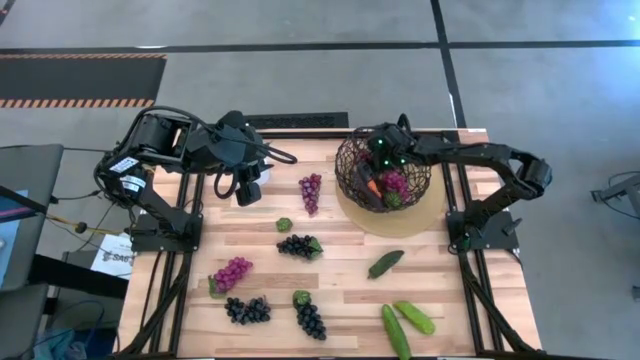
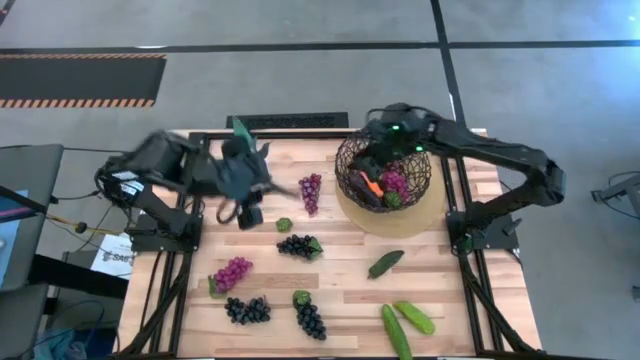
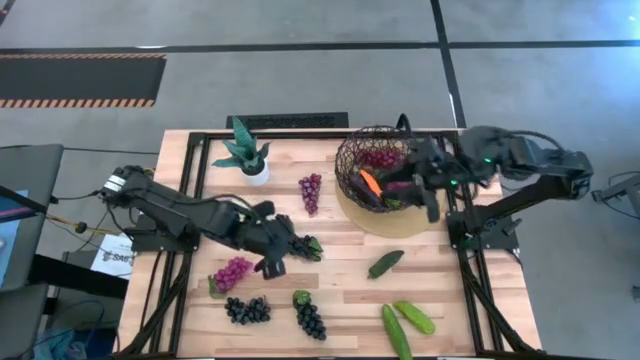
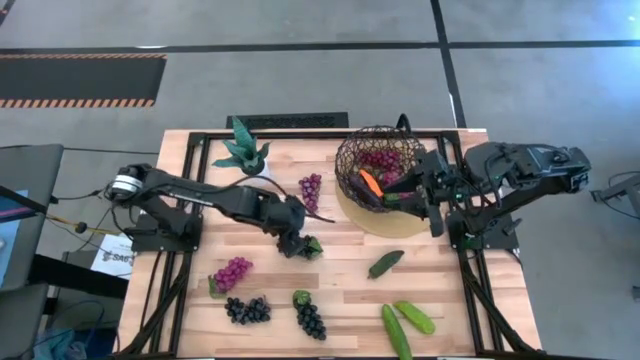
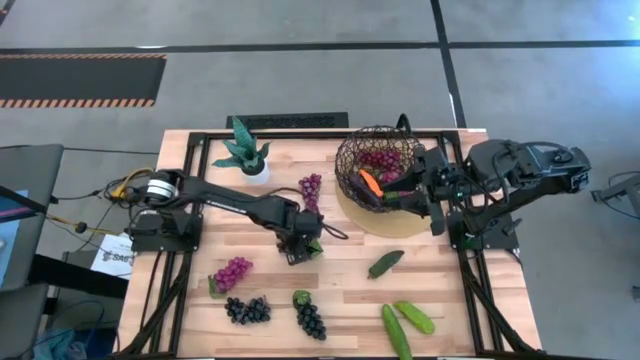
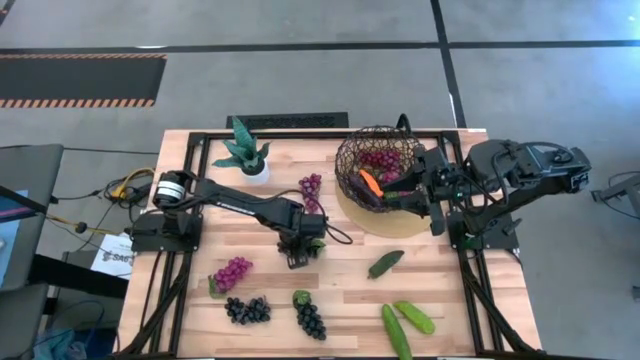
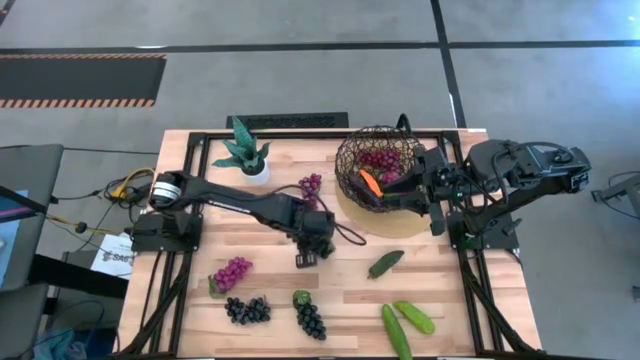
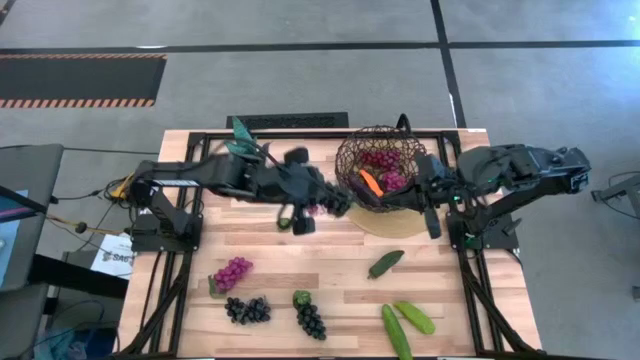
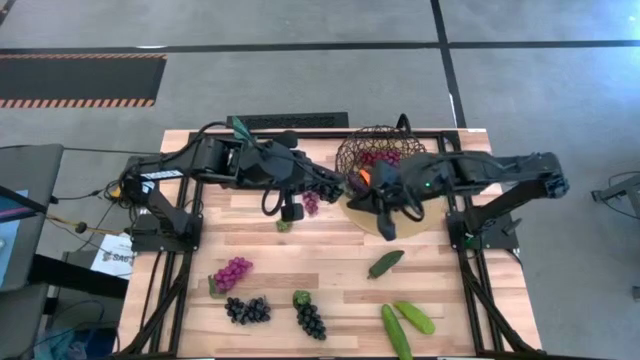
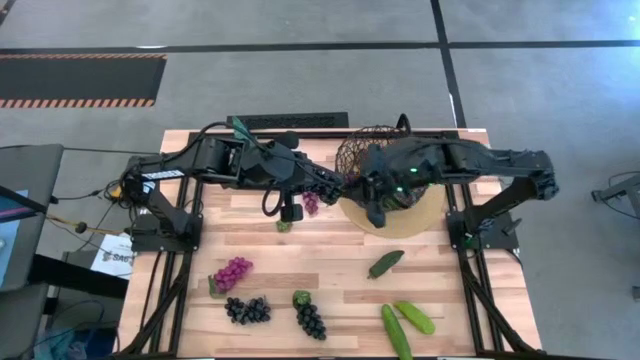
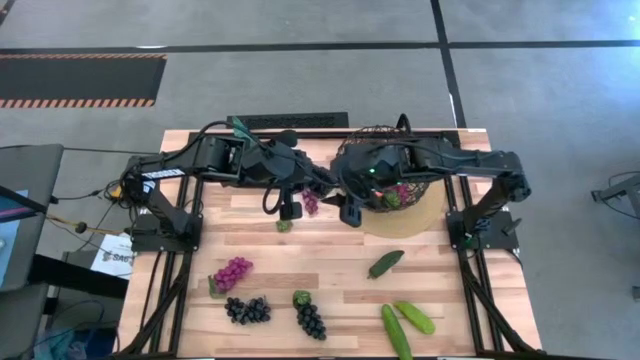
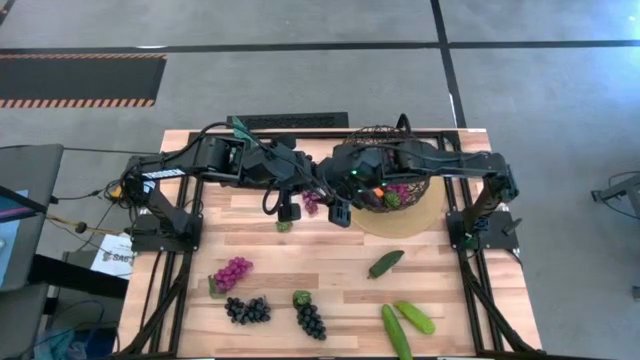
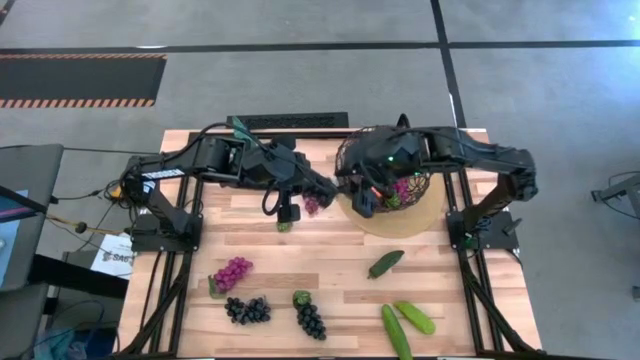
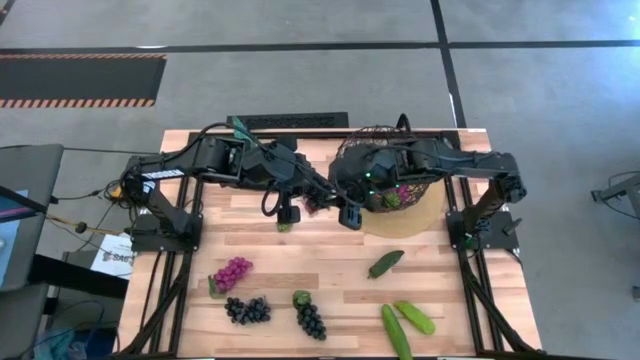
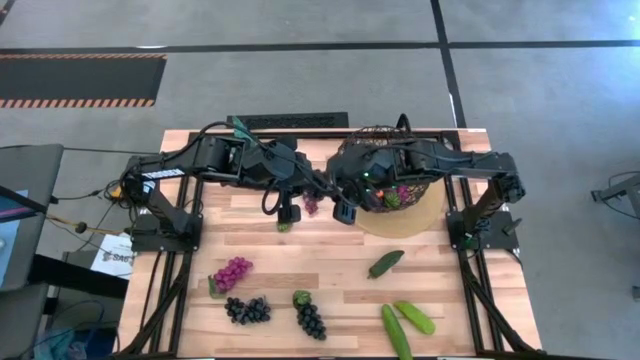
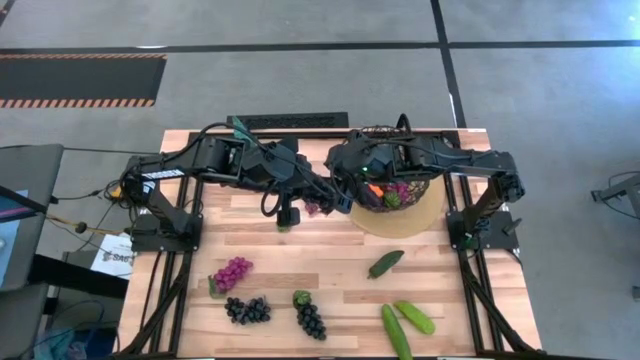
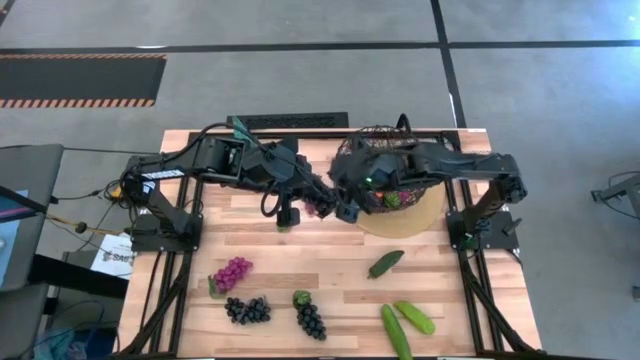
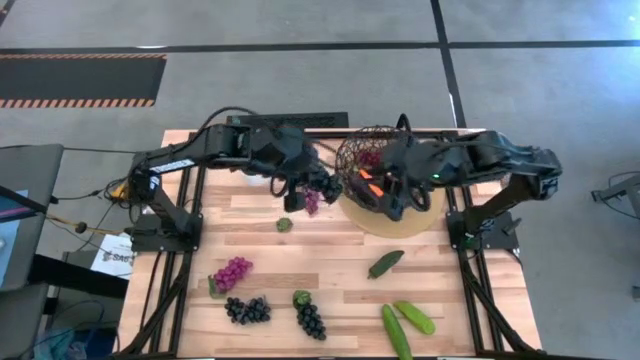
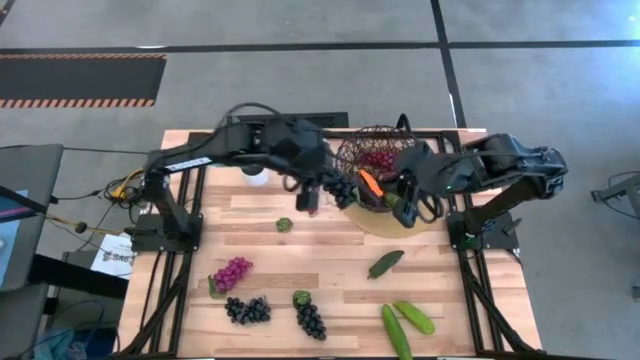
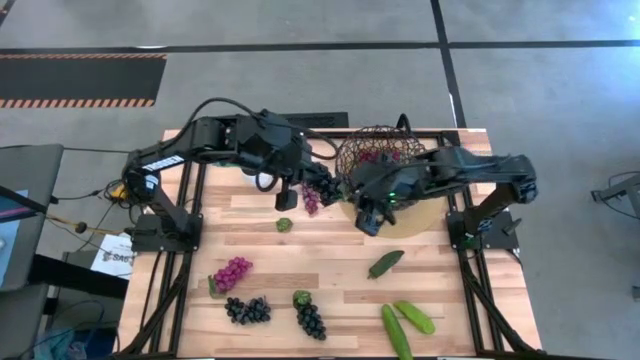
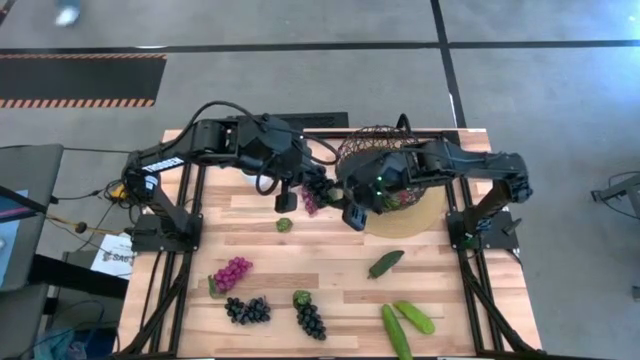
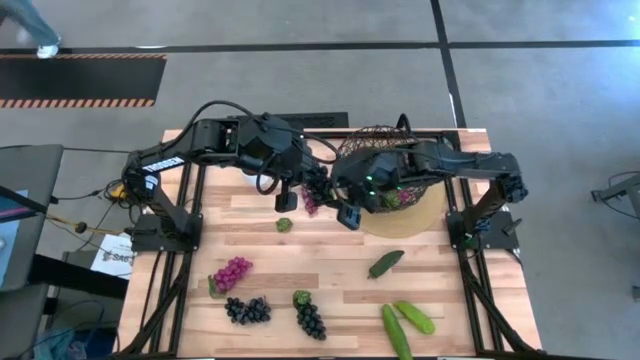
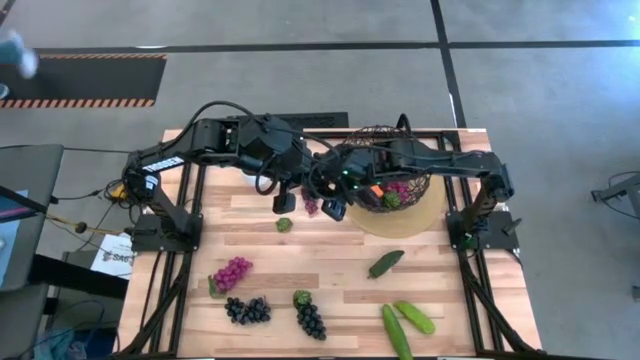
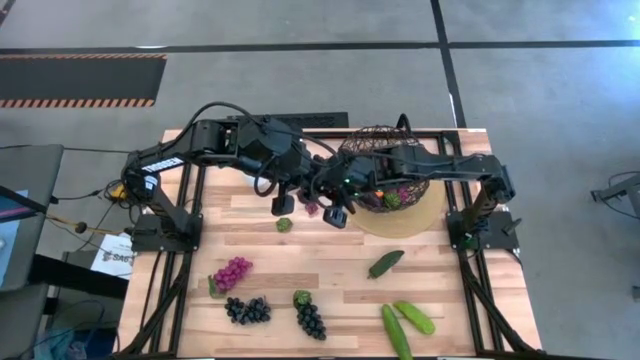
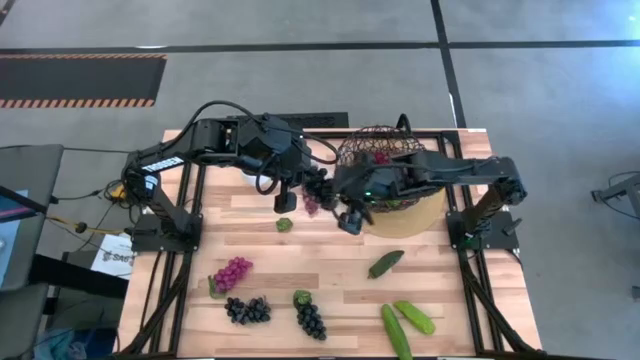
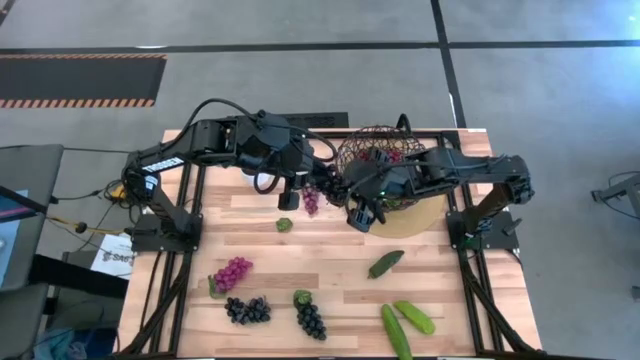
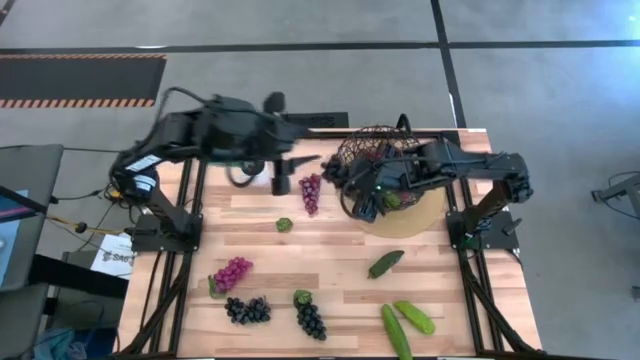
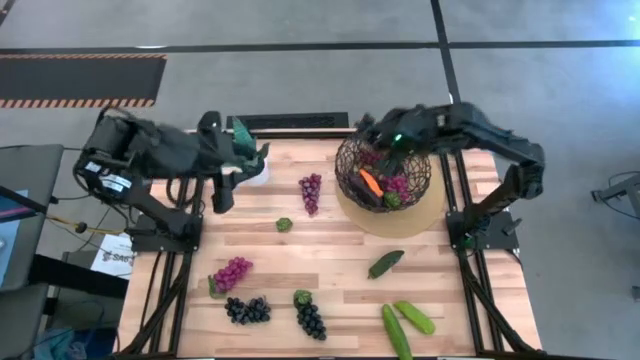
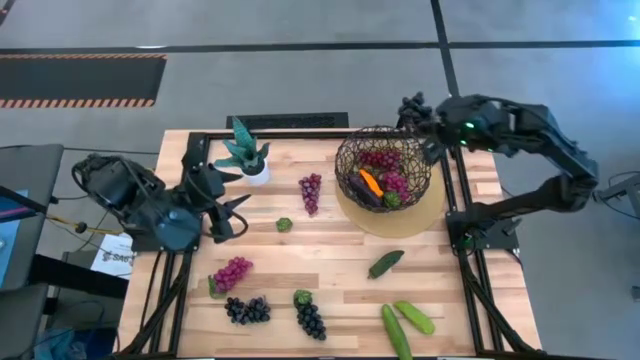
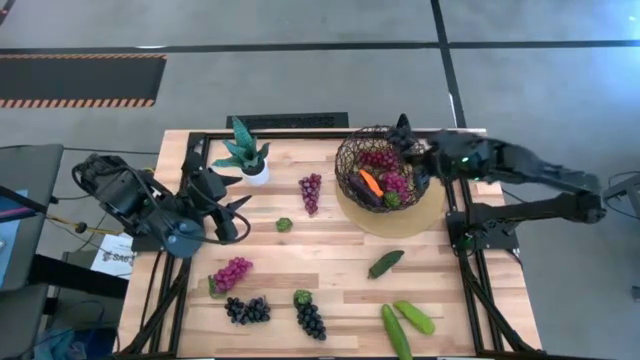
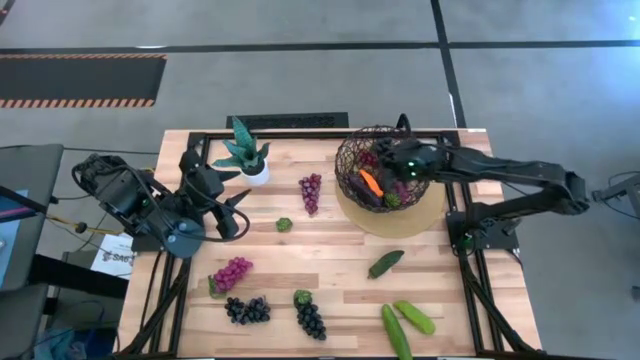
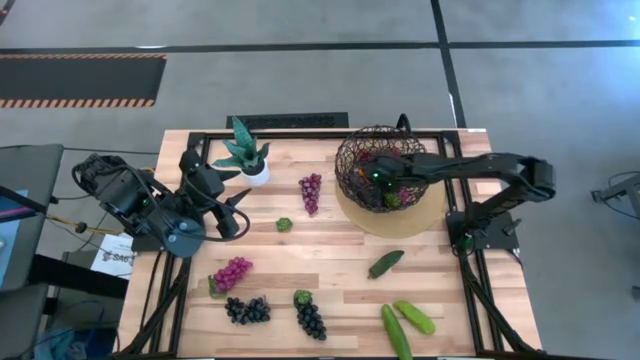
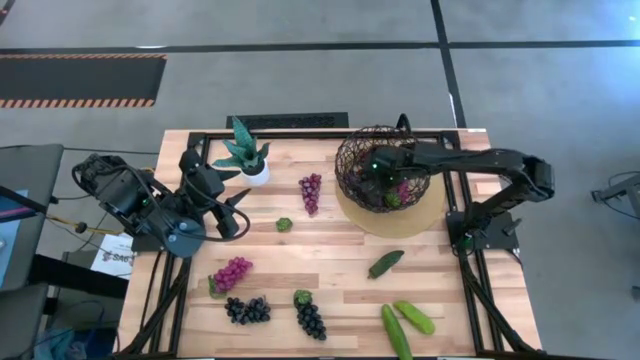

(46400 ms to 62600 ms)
Task: Build produce basket
Put the black grapes into the black wire basket

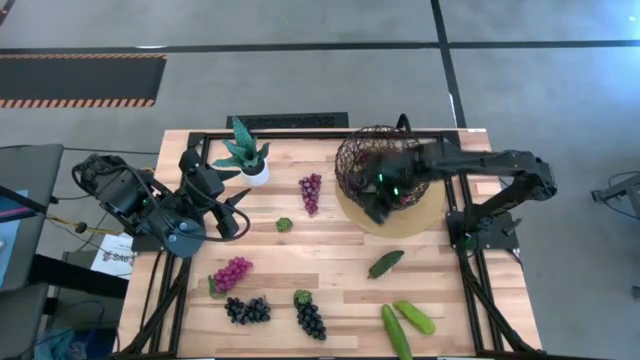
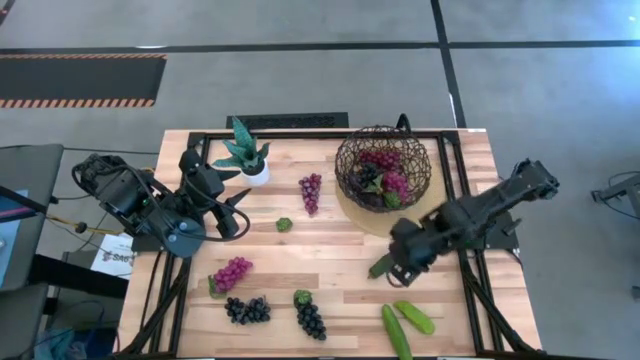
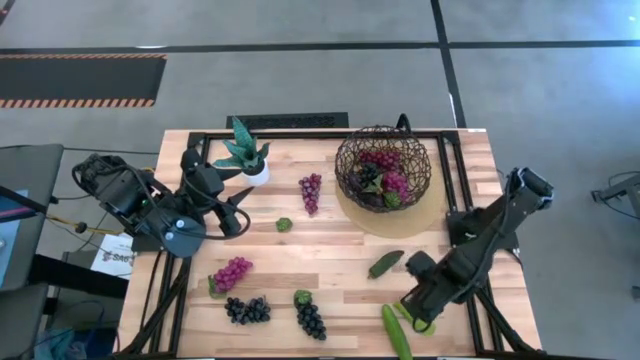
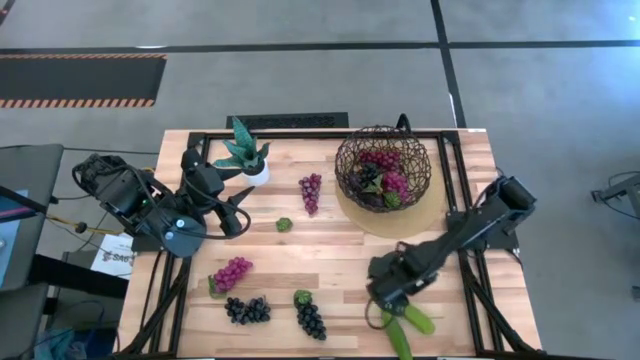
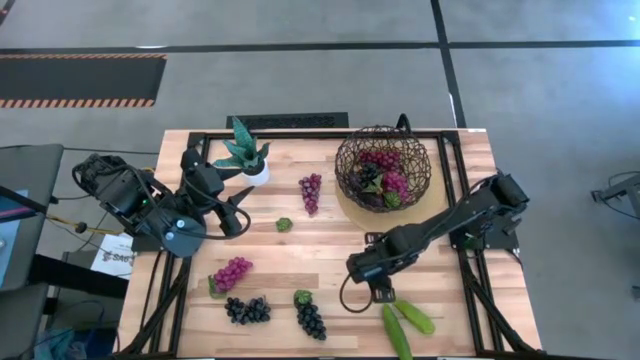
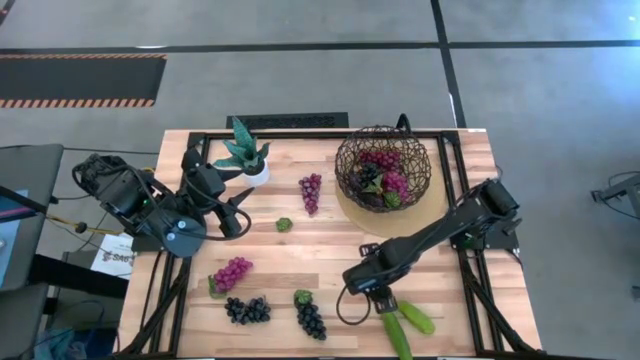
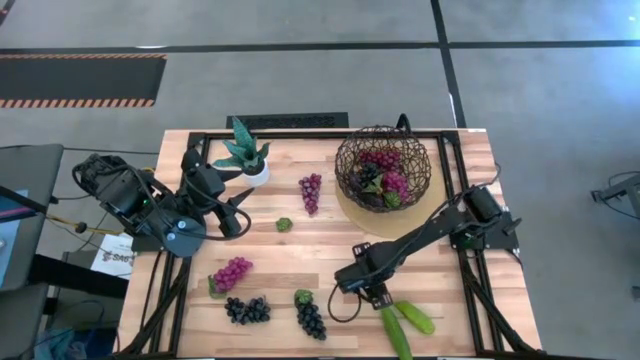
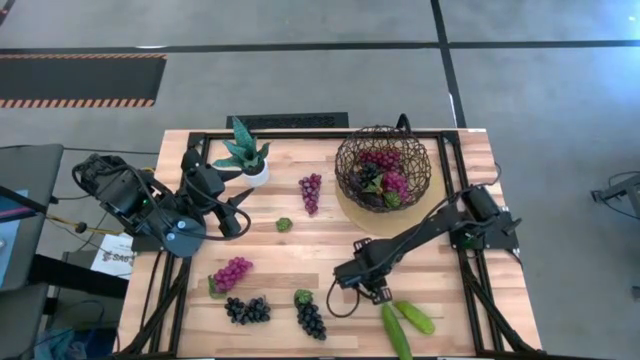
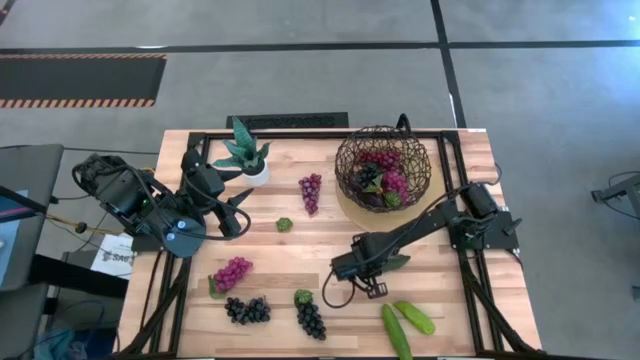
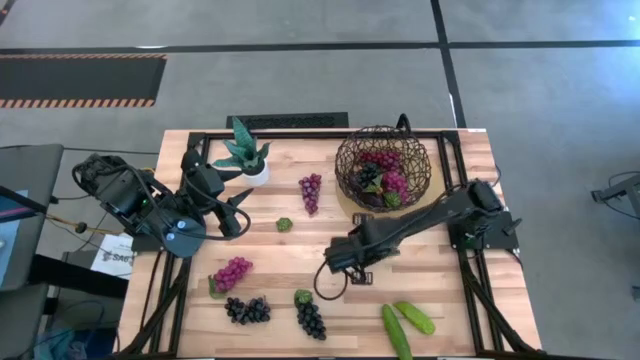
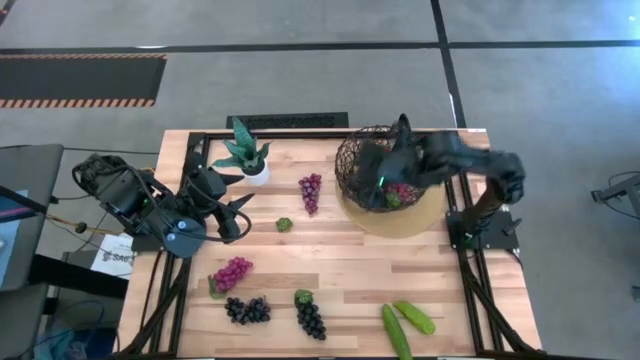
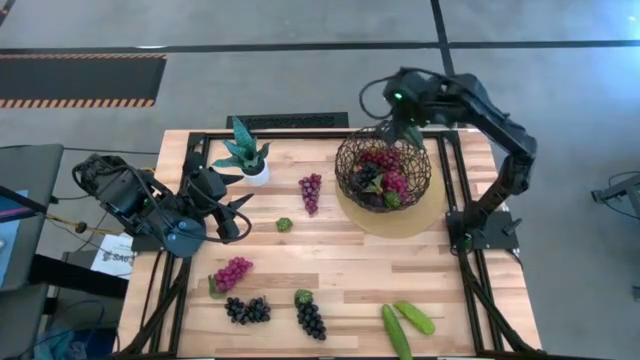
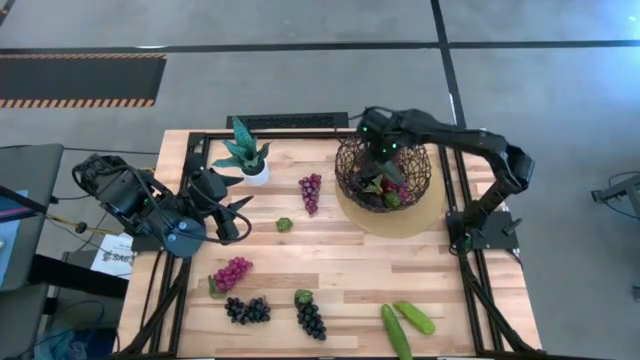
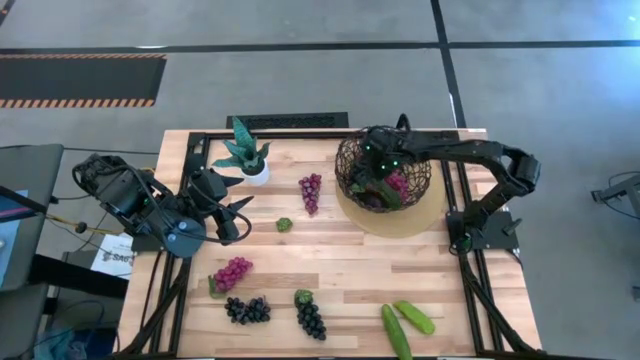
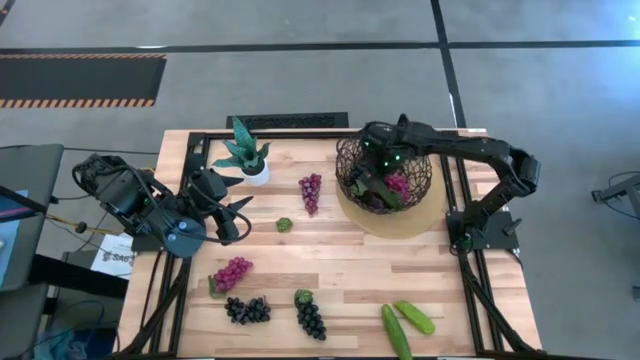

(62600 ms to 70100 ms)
Put the green chili pepper into the black wire basket
